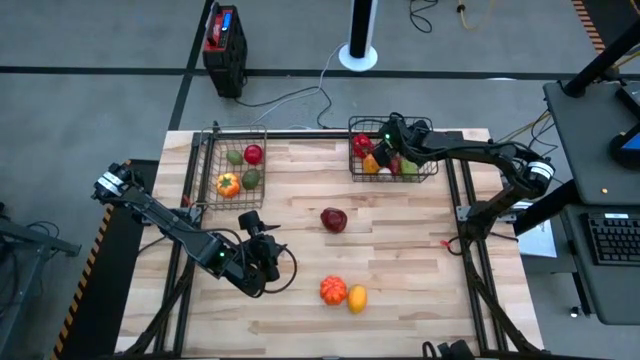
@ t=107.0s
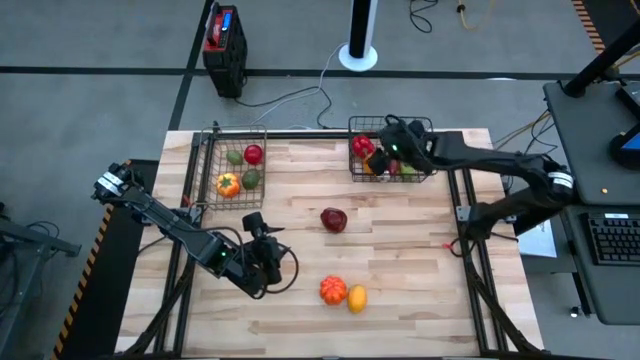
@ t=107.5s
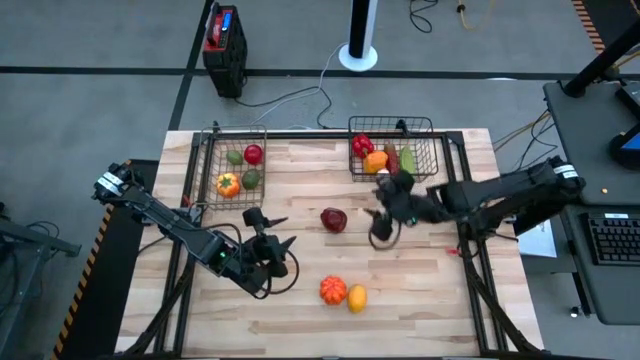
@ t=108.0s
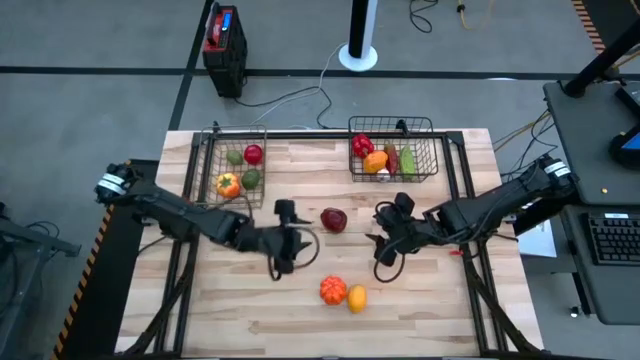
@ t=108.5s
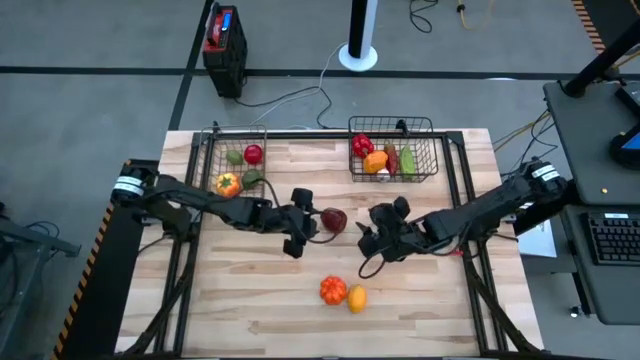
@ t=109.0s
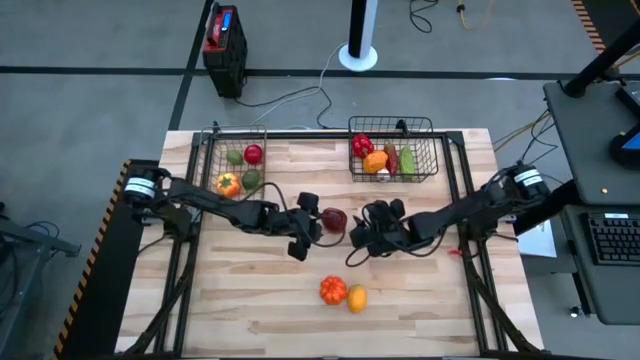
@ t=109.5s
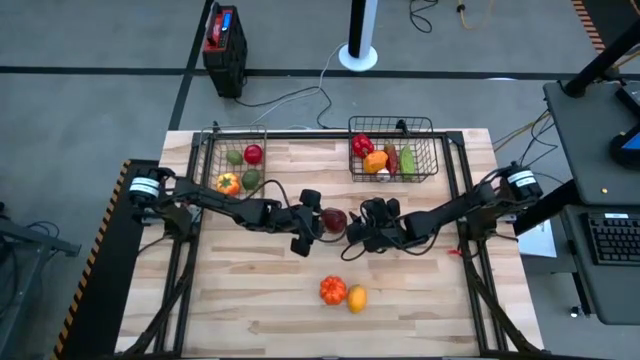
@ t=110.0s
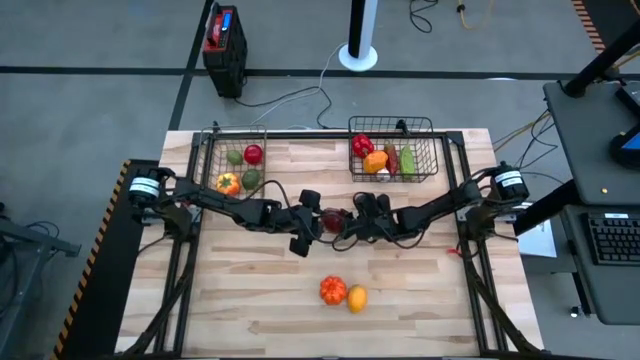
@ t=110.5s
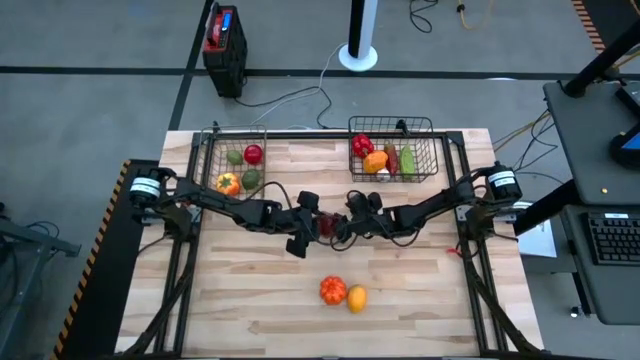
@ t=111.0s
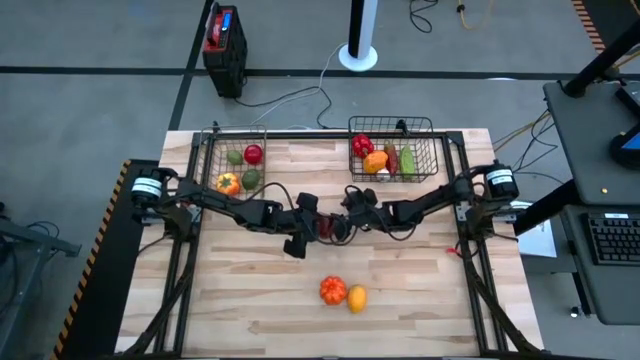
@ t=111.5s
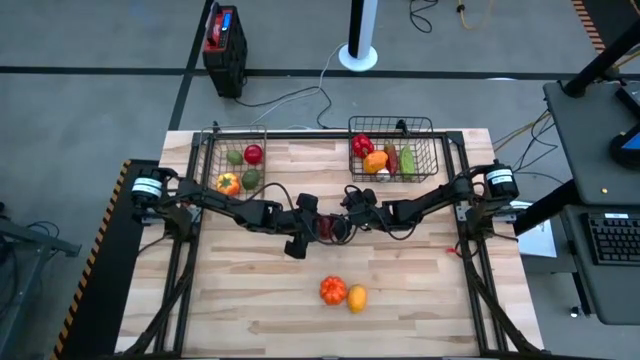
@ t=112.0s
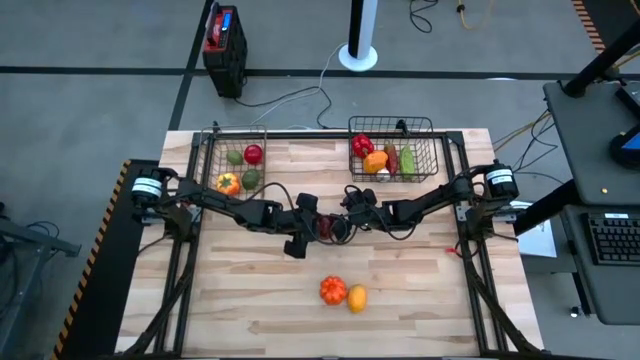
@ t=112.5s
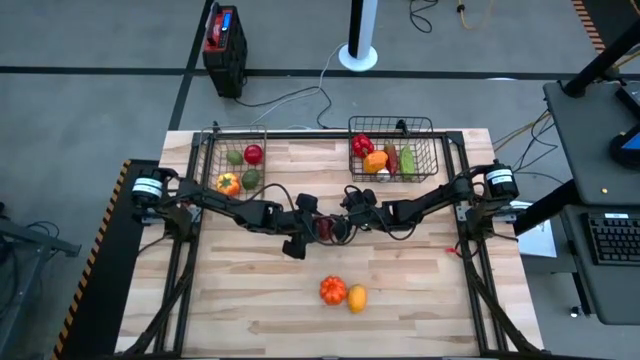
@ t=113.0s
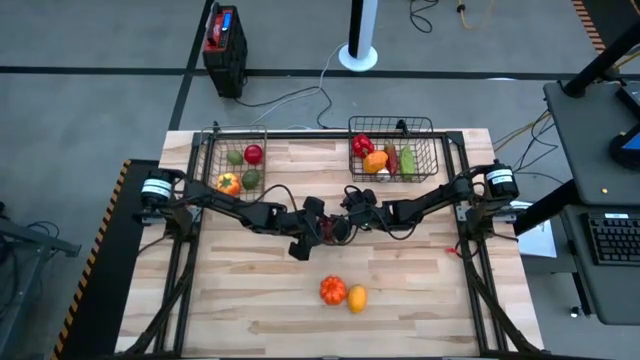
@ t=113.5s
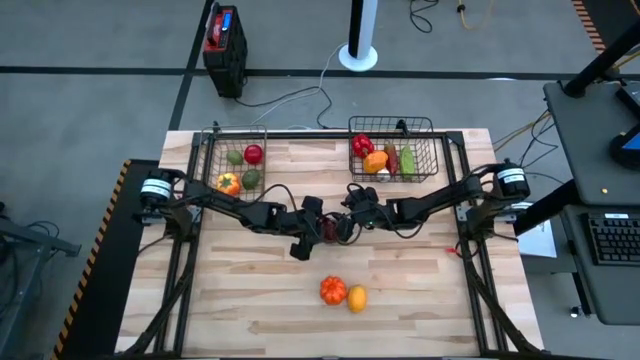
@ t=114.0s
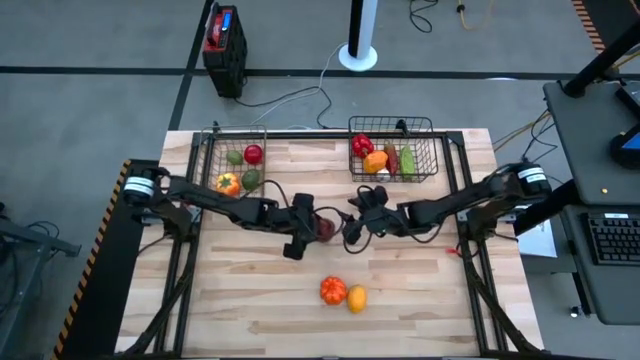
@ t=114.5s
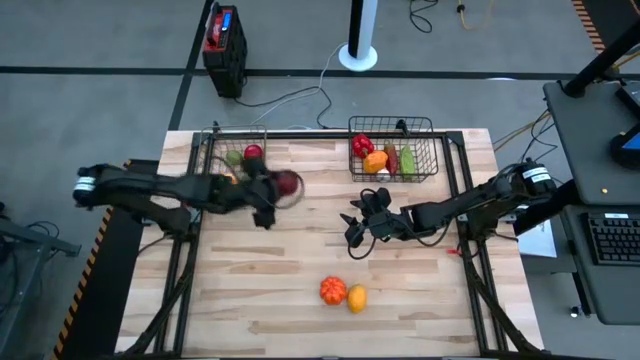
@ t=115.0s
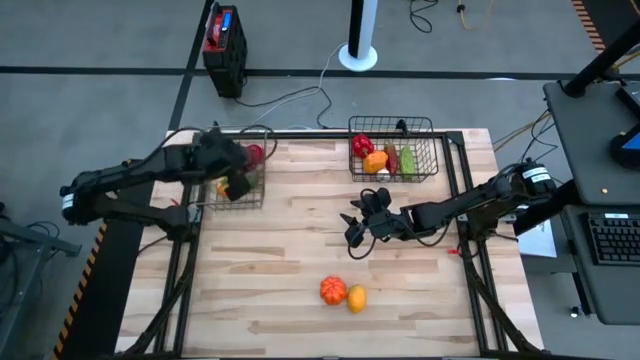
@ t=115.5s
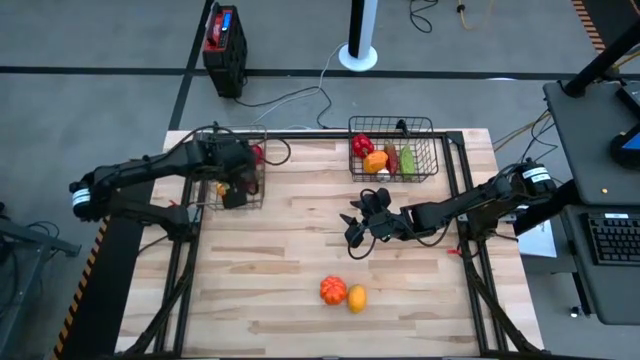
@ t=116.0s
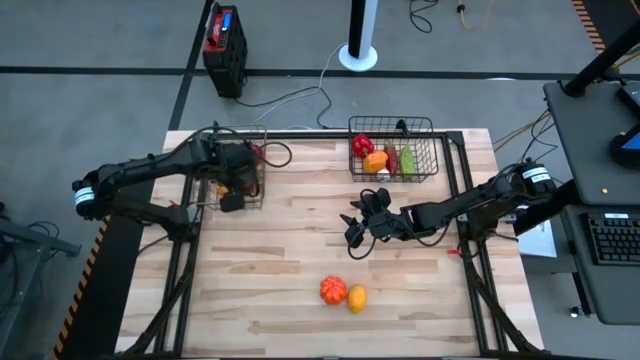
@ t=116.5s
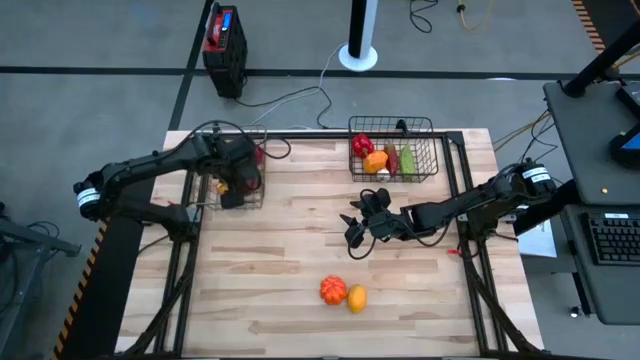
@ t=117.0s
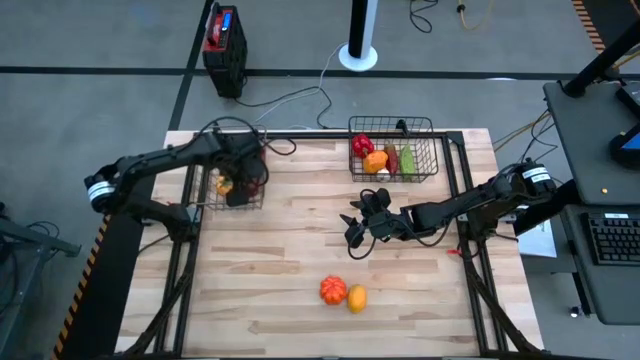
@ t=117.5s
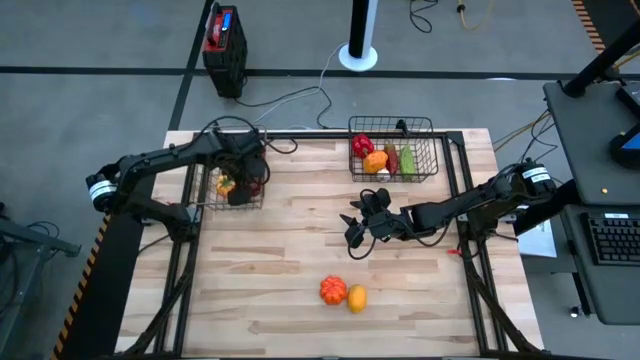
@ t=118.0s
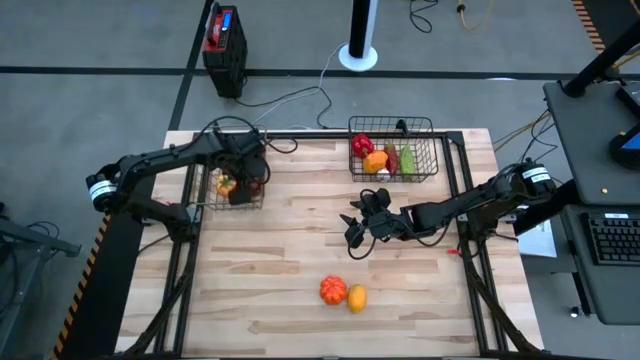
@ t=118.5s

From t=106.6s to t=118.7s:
Task: Sort produce into baskets
Put the apple into the brown wire basket

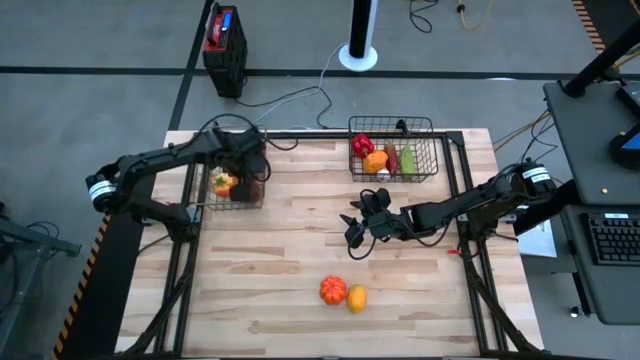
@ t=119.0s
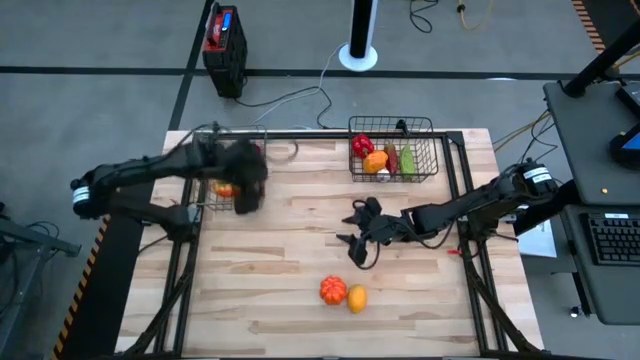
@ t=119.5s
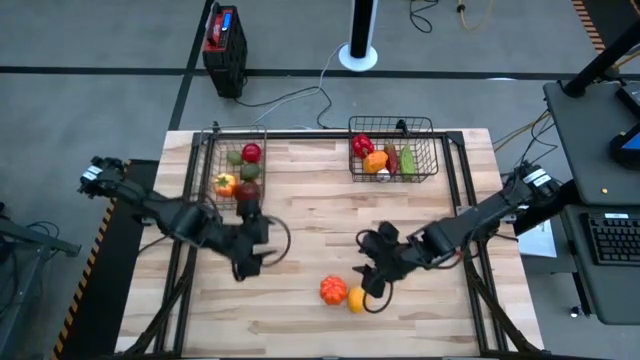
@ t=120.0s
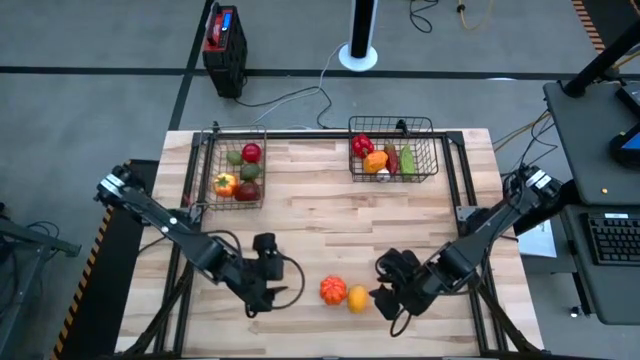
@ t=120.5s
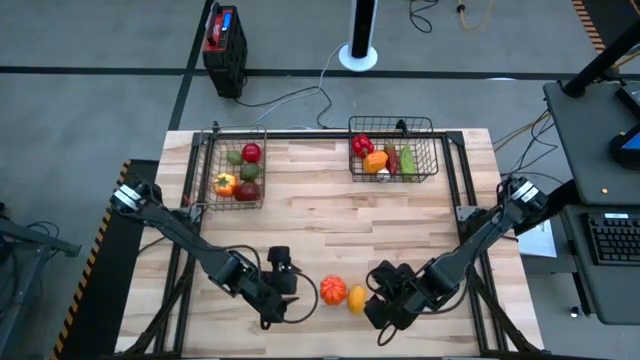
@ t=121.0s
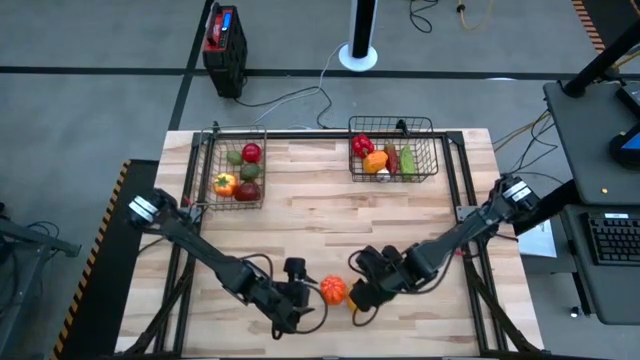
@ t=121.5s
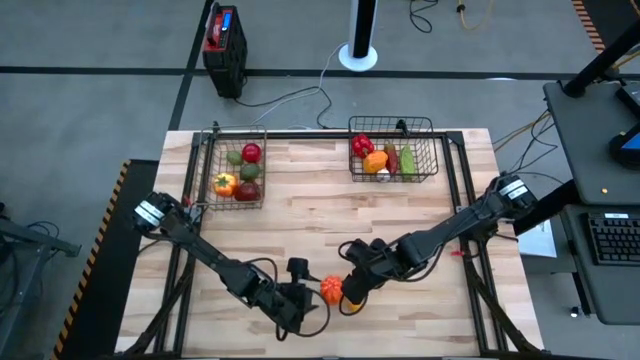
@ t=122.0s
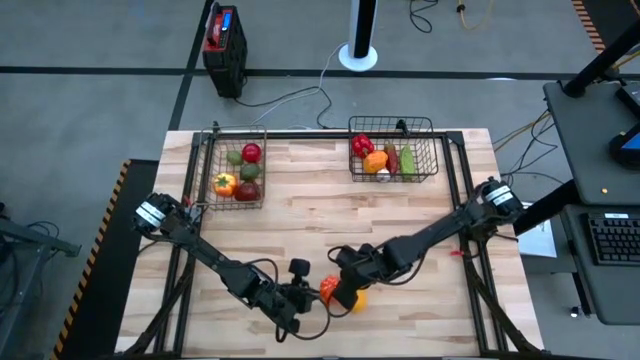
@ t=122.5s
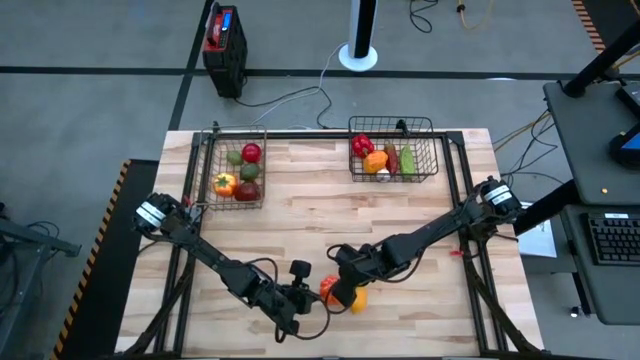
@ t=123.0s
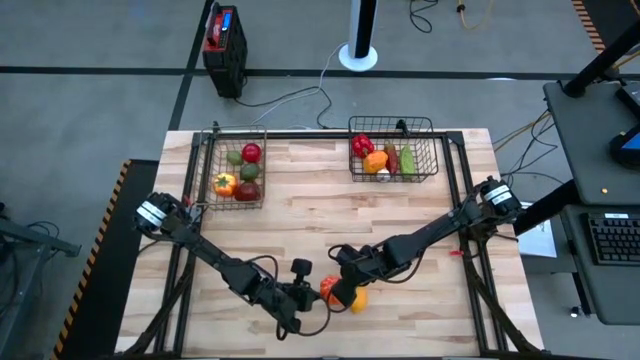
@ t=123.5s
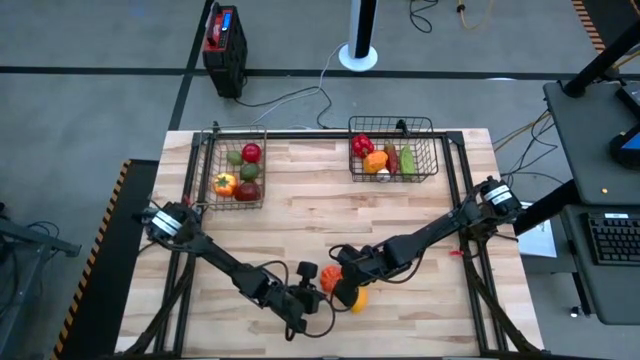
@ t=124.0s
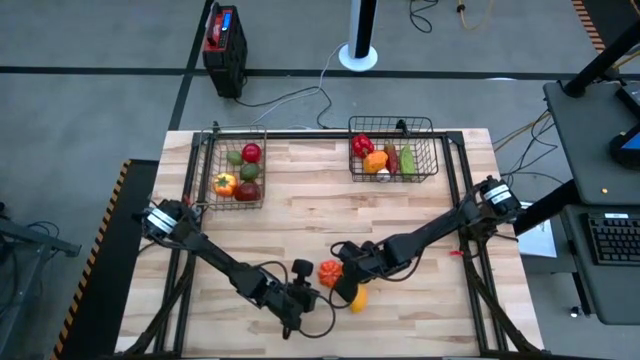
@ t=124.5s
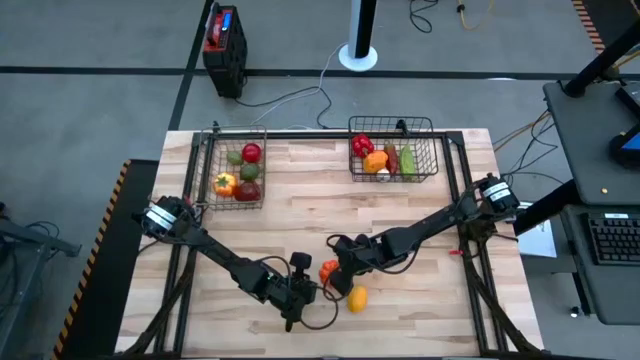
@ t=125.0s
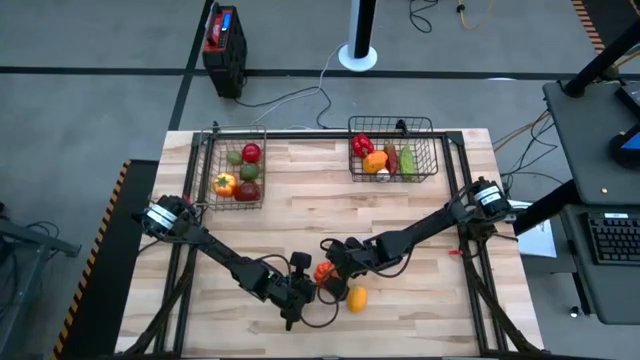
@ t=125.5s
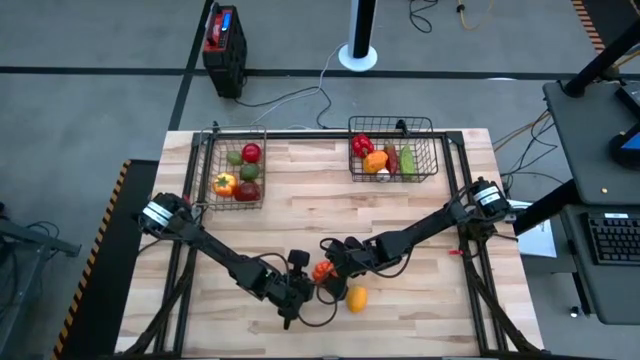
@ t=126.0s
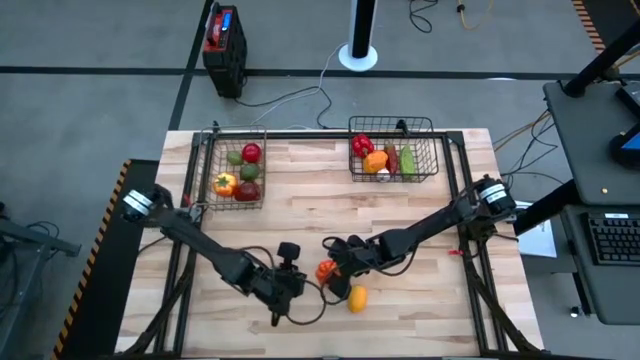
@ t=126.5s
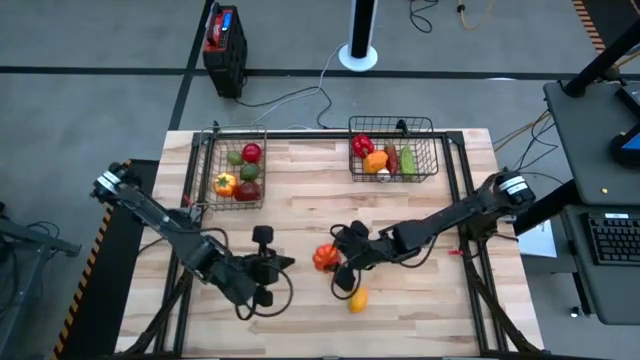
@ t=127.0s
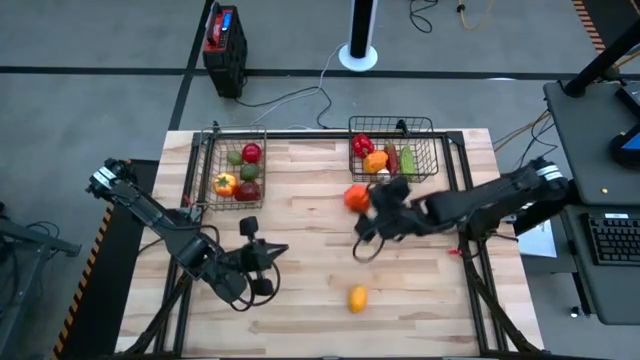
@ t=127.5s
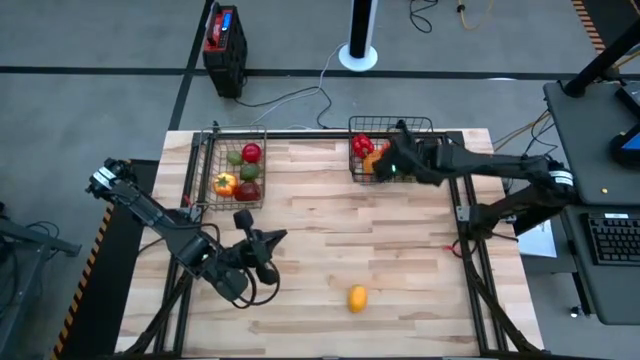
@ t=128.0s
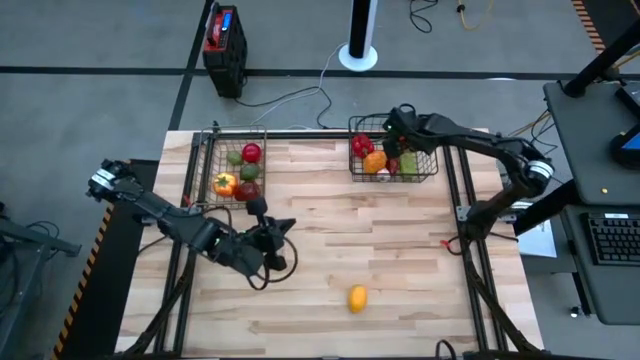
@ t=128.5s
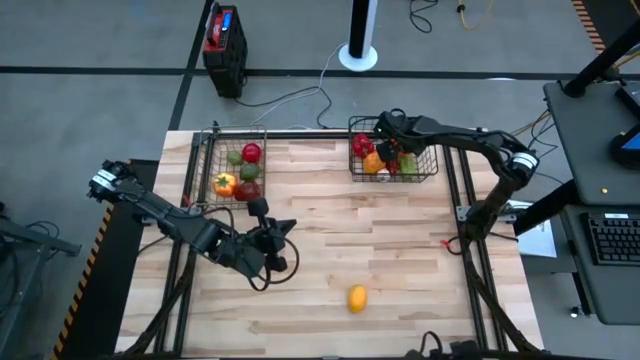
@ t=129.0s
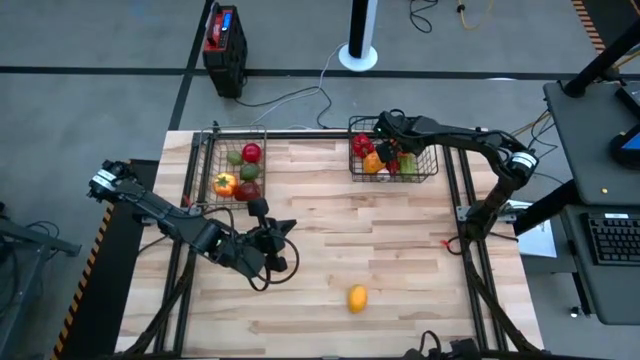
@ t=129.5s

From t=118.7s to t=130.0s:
Put the pumpkin into the black wire basket
